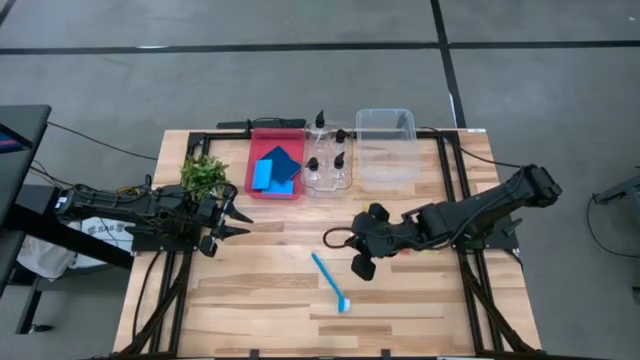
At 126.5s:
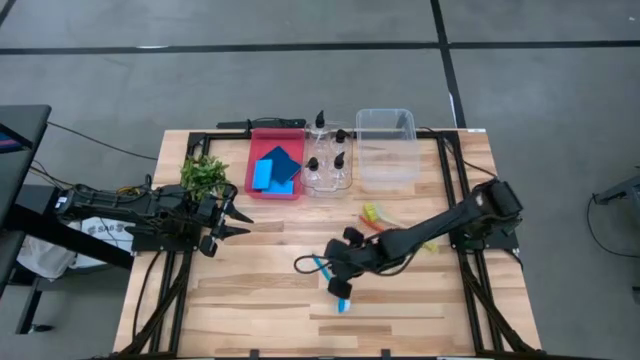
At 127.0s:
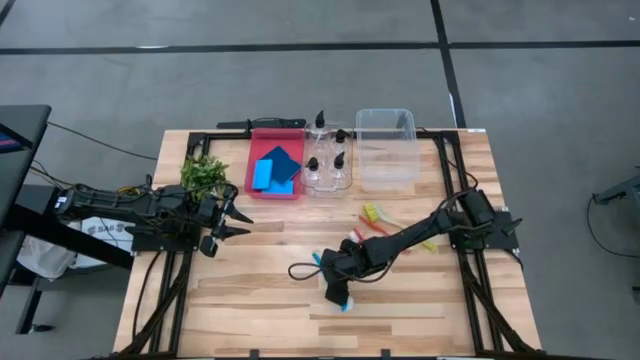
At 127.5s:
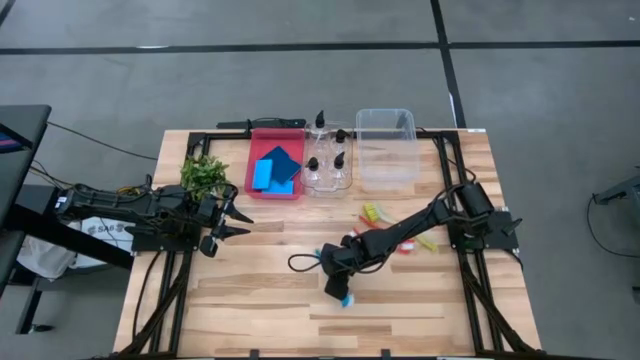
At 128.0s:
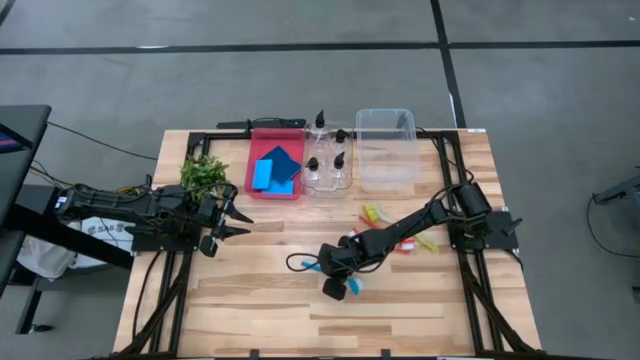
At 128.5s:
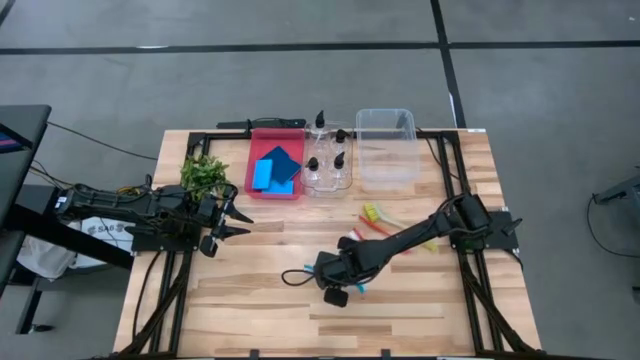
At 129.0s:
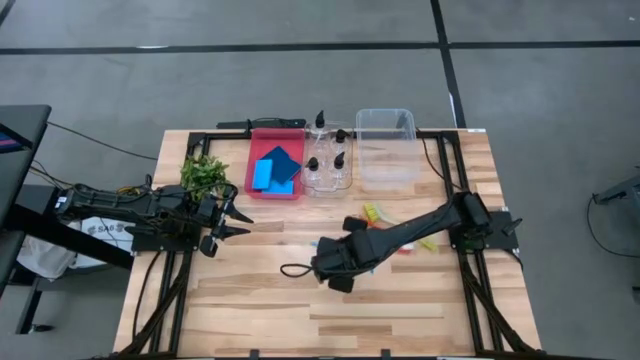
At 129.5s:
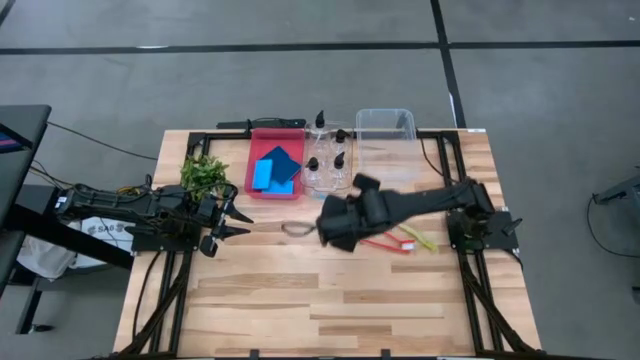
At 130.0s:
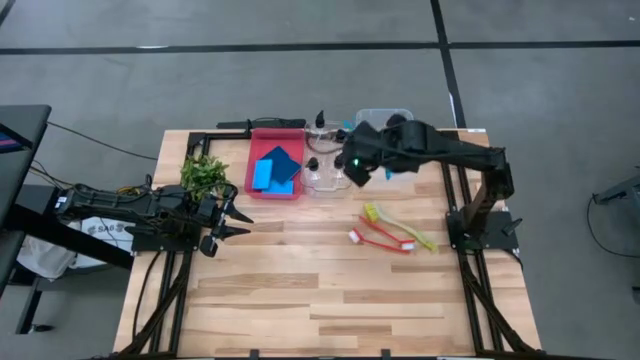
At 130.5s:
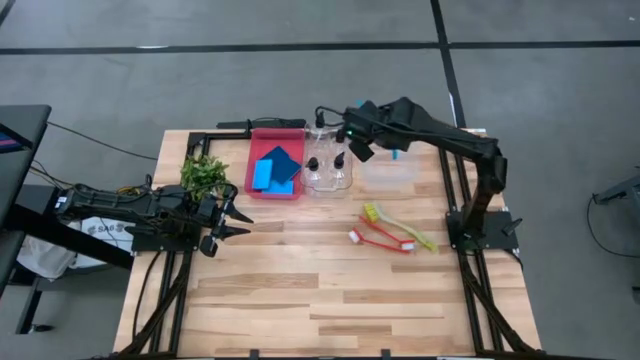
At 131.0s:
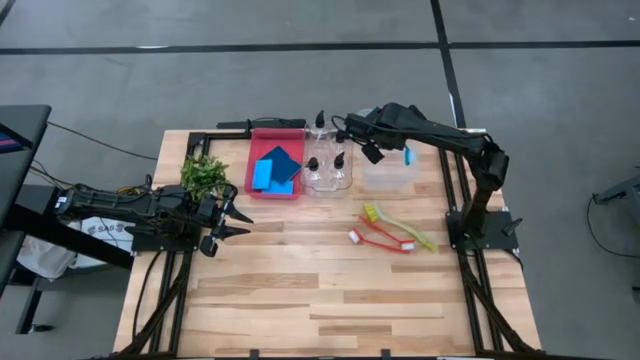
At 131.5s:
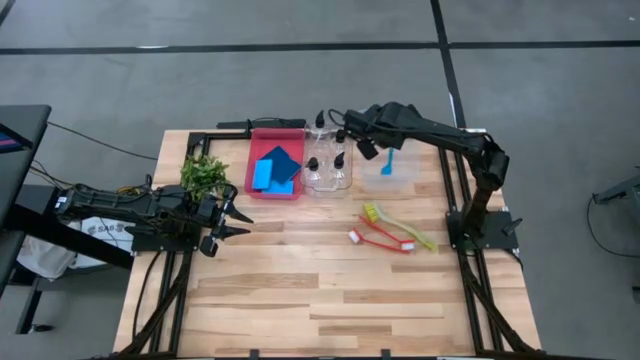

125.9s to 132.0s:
Task: Pick & Place Kitchen Sink Supplies
Put the blue dish brush into the right transparent bin

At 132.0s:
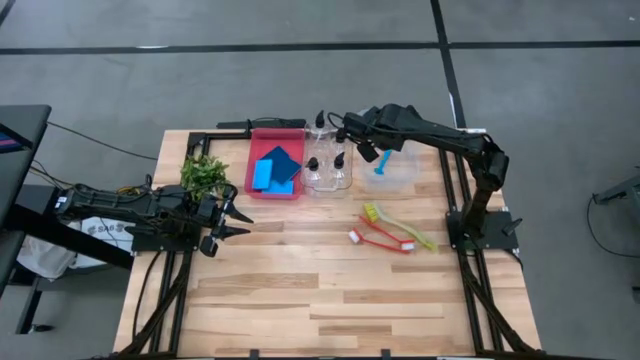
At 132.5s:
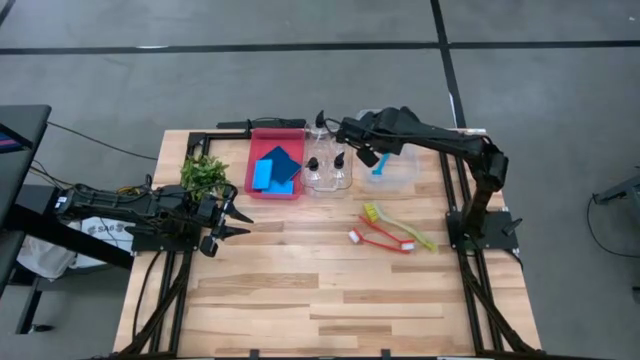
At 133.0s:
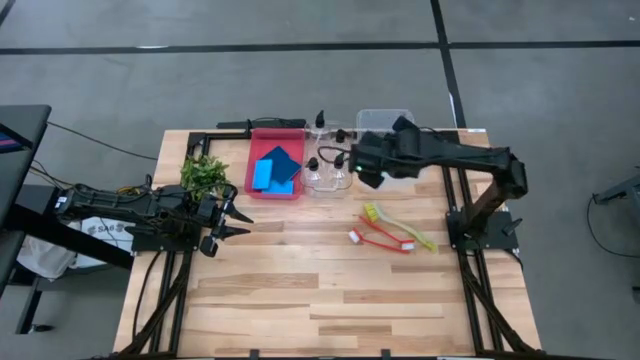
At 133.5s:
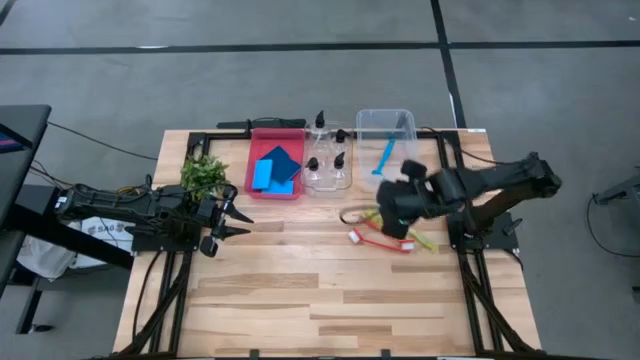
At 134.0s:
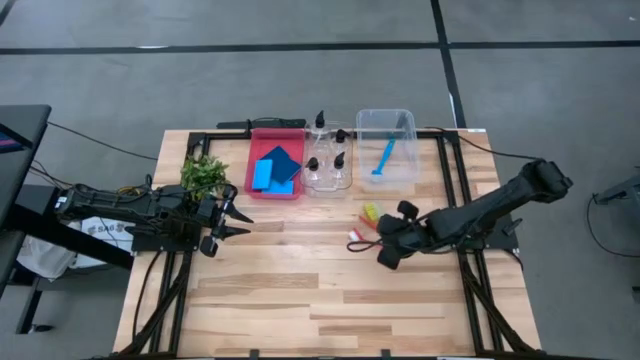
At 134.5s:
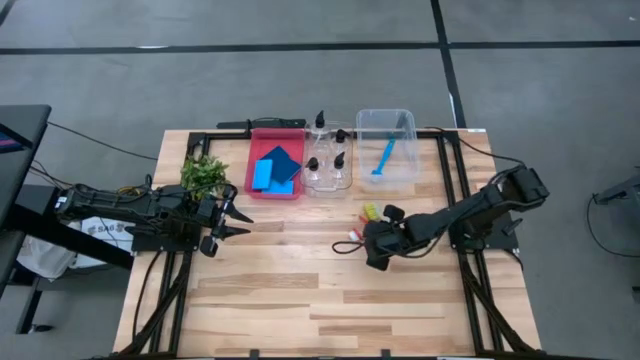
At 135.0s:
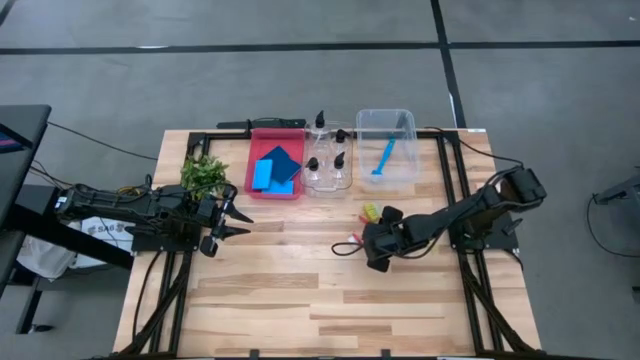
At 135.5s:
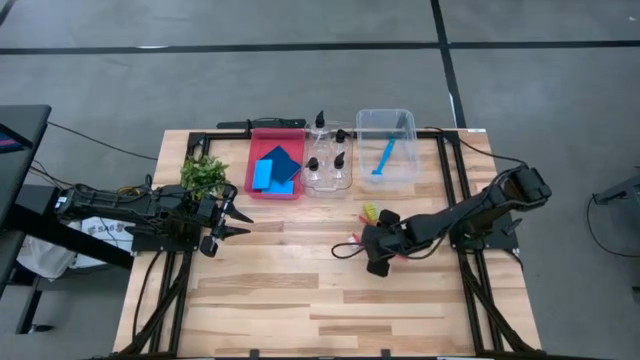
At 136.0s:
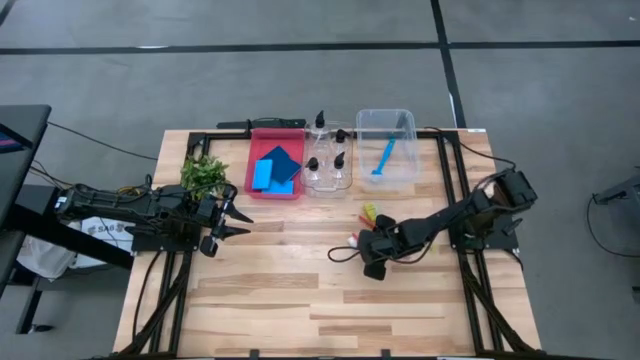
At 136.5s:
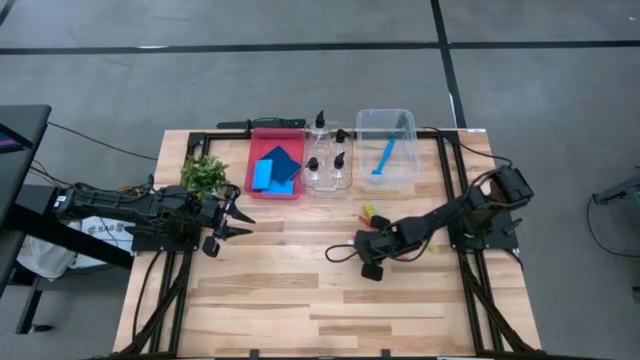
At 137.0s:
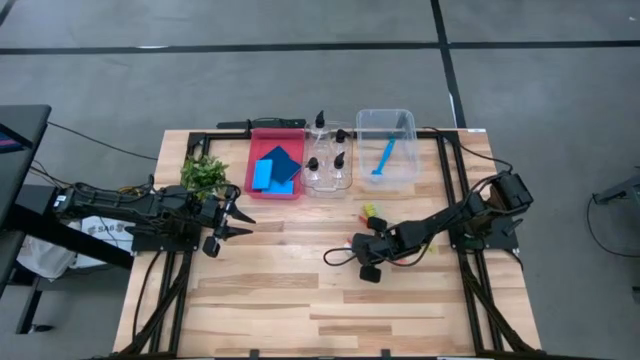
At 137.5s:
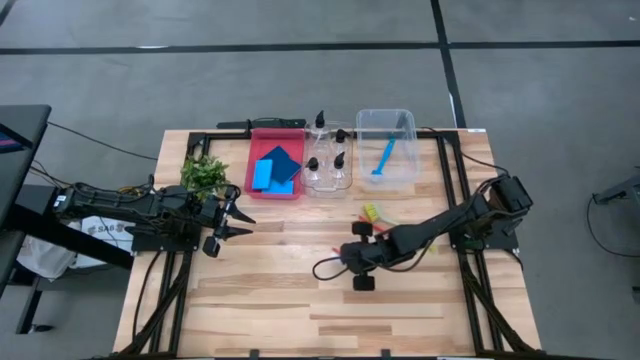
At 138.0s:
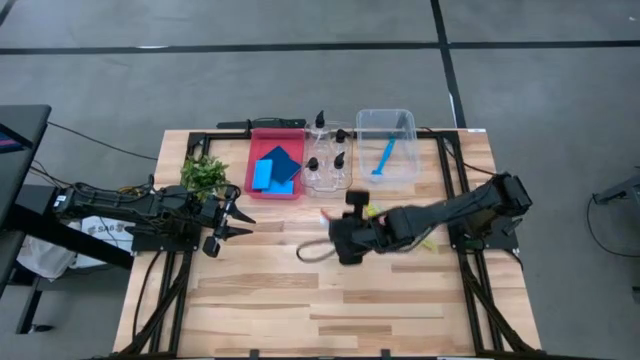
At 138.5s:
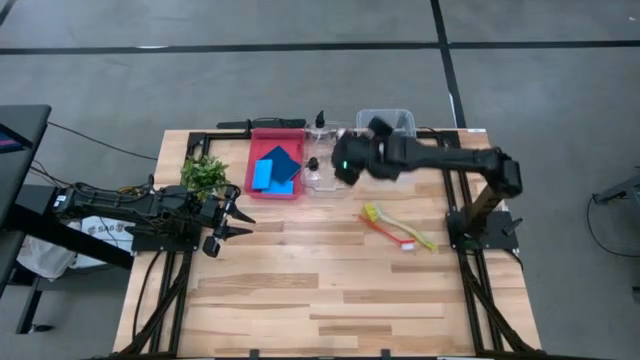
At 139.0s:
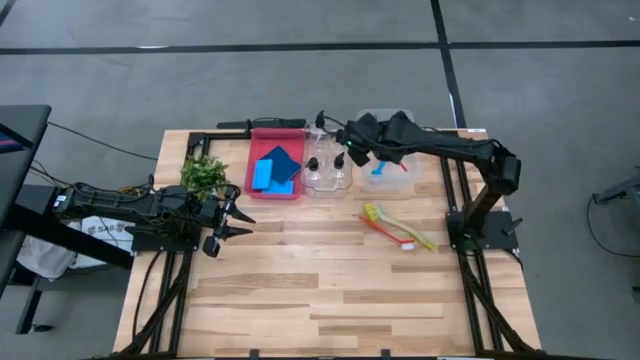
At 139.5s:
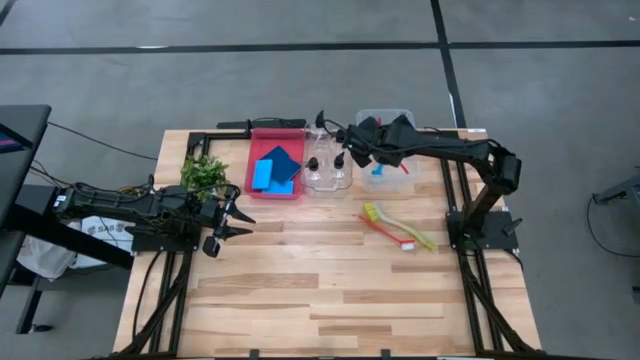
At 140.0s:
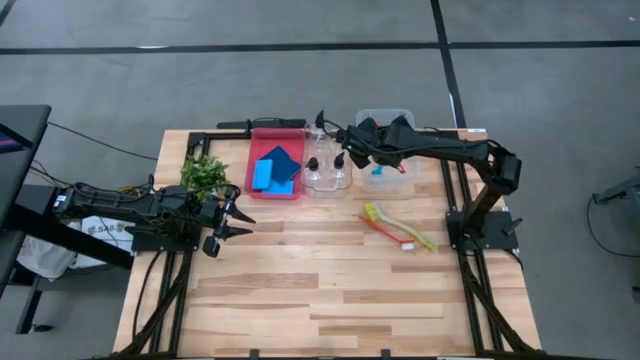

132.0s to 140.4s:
Put the red dish brush into the right transparent bin

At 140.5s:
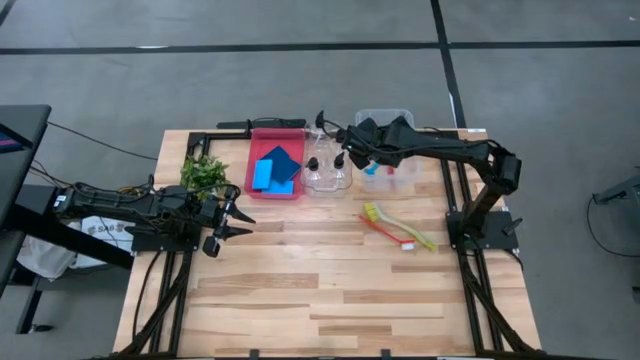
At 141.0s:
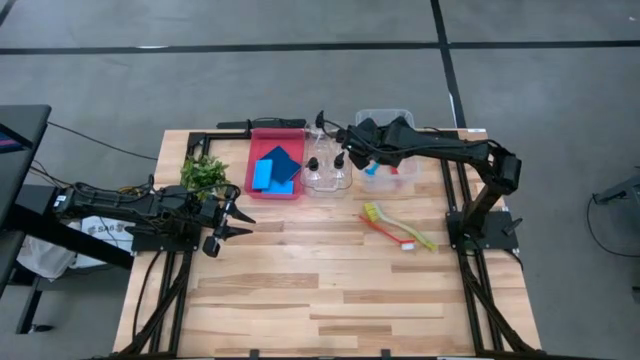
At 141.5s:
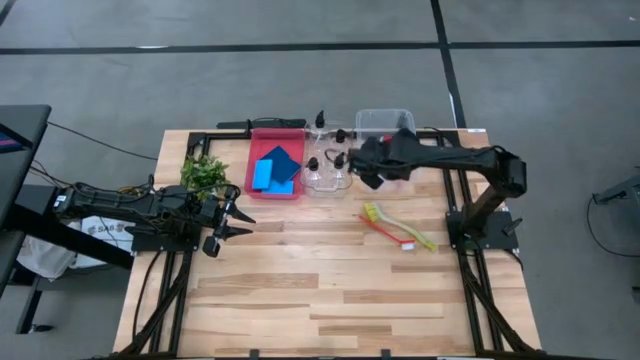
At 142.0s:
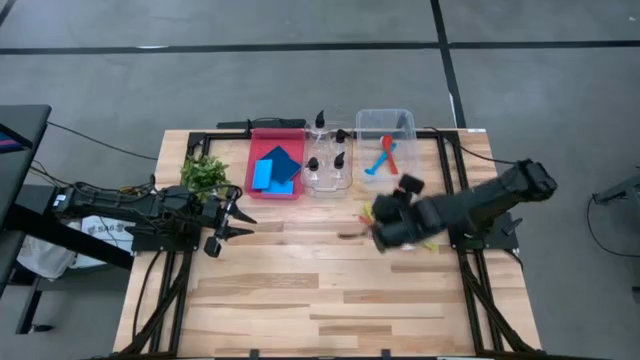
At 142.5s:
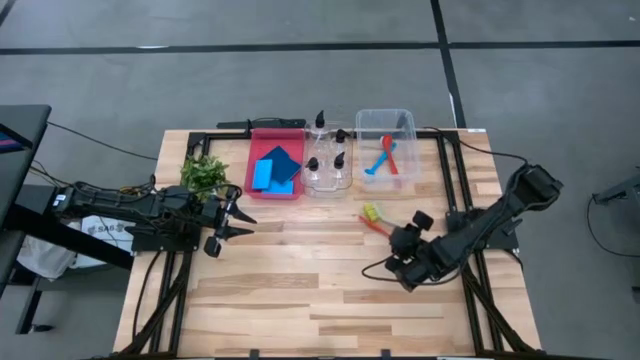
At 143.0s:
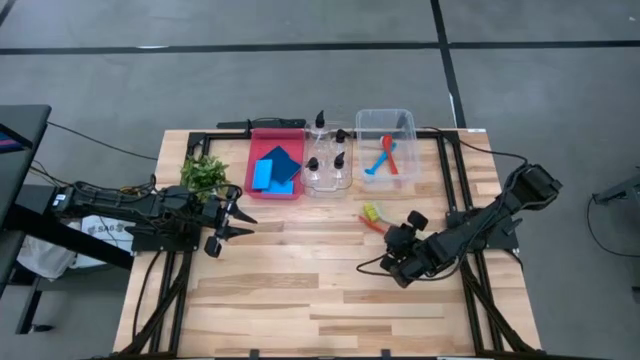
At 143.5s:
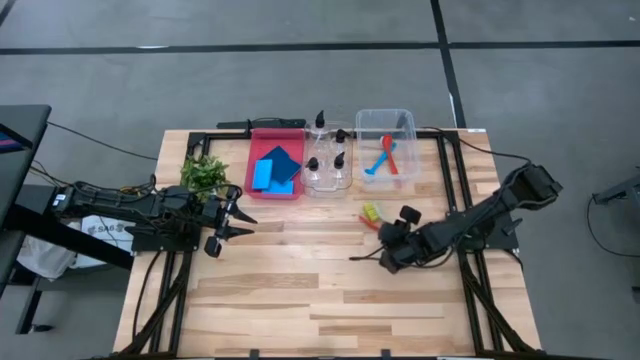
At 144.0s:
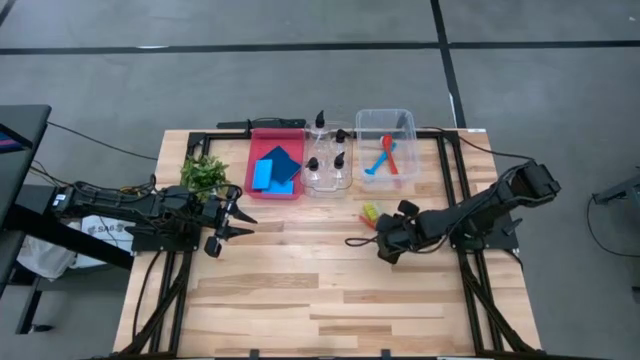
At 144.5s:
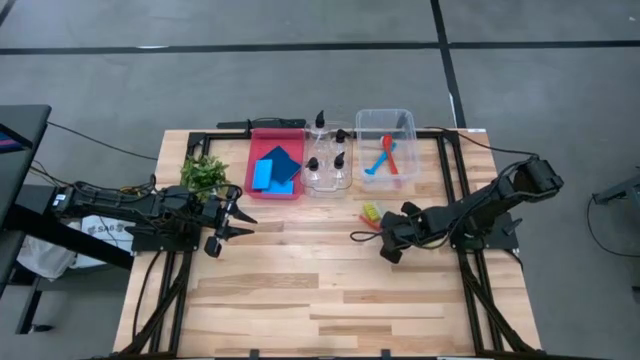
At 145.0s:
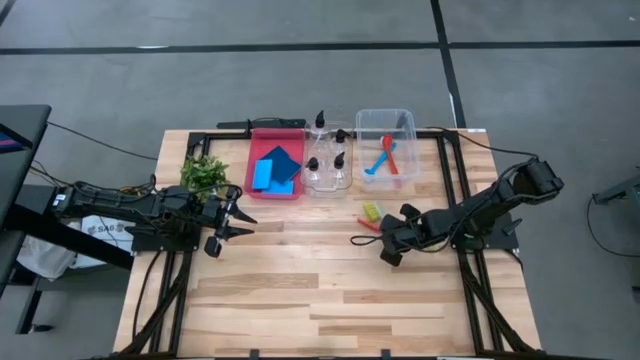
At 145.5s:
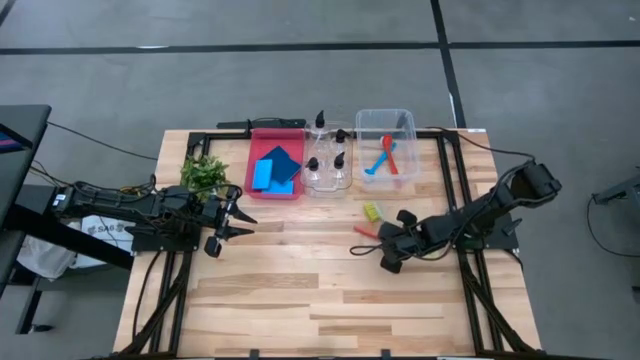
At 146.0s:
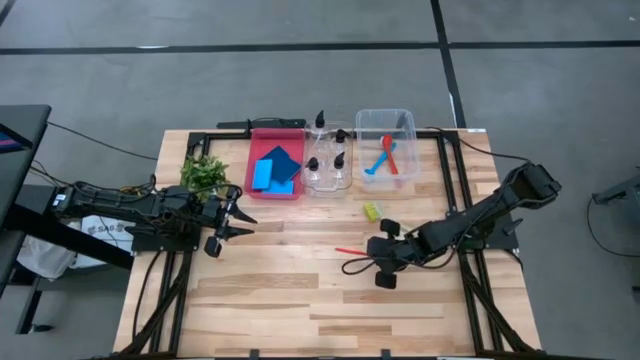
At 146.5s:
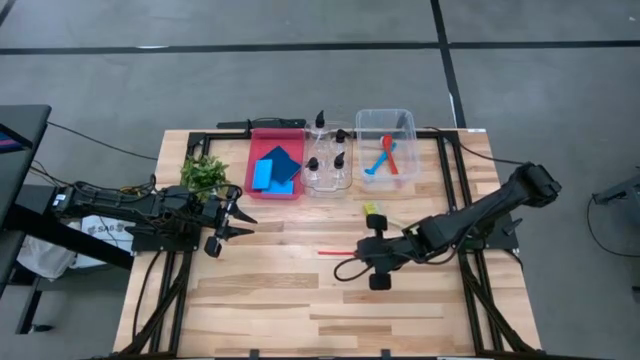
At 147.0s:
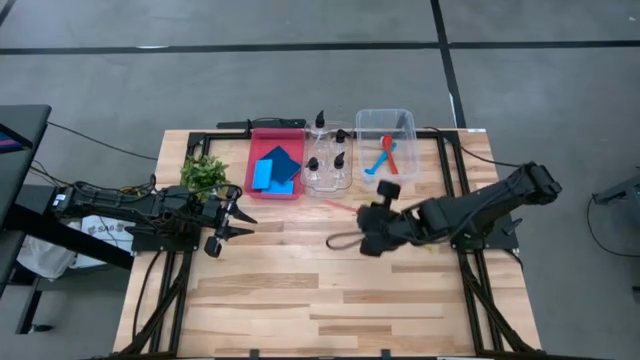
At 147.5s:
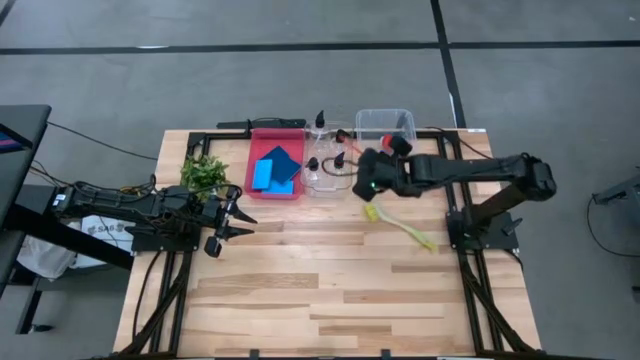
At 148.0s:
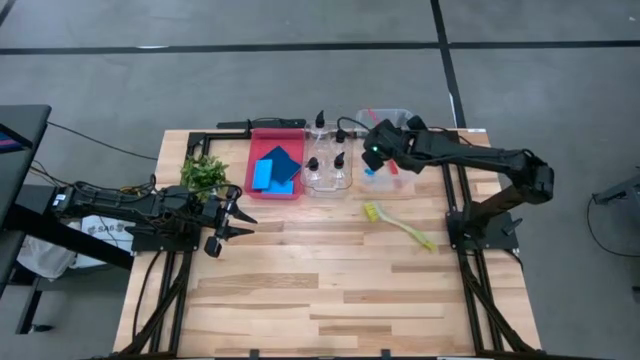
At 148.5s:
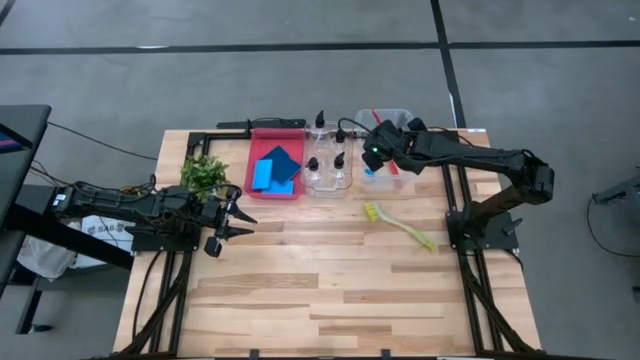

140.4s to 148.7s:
Put the red dish brush into the right transparent bin
